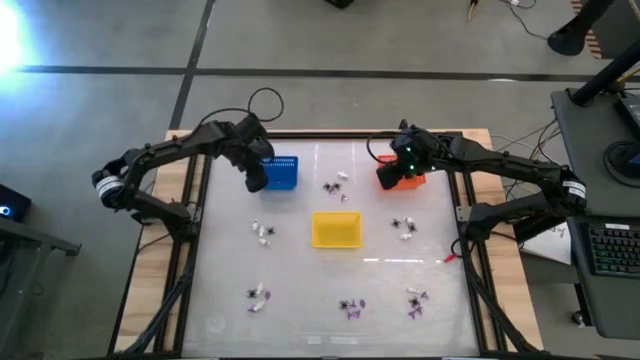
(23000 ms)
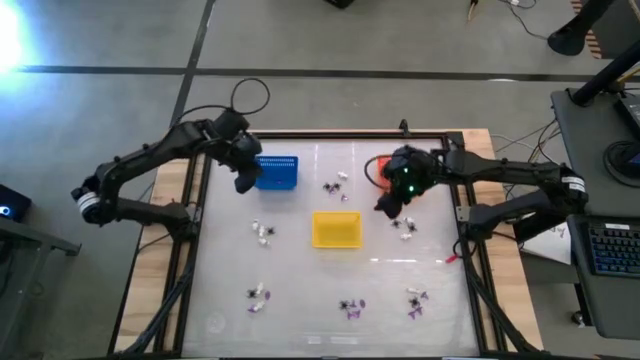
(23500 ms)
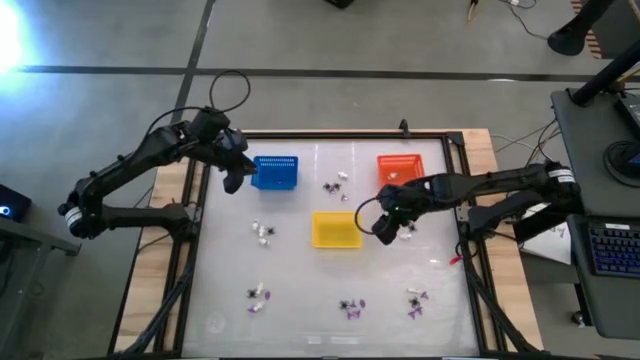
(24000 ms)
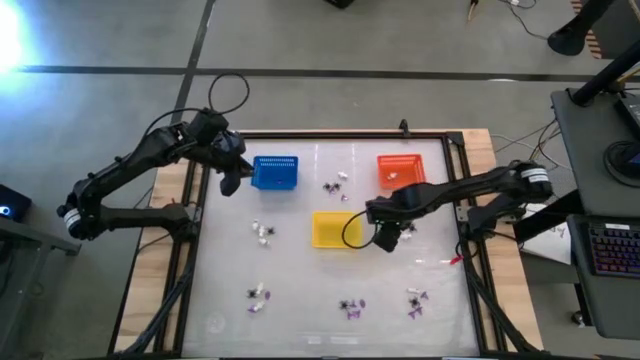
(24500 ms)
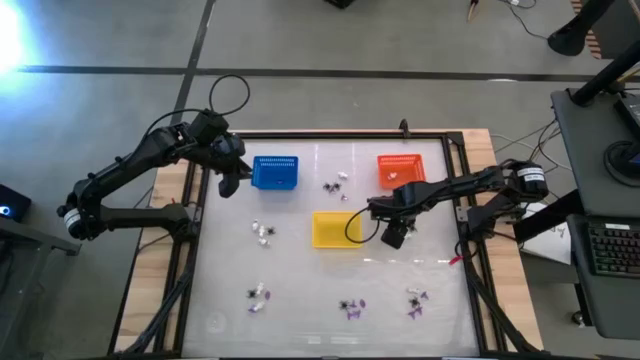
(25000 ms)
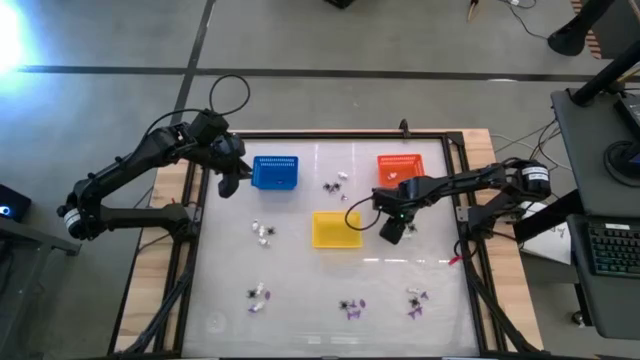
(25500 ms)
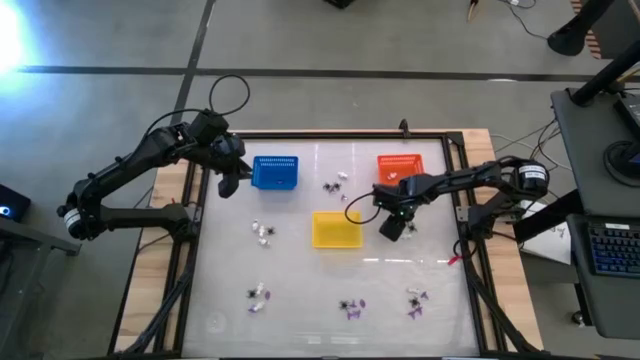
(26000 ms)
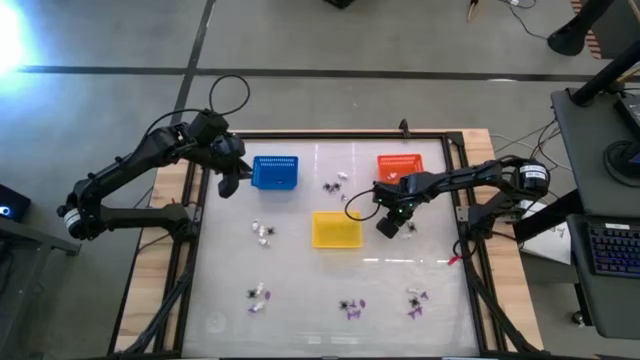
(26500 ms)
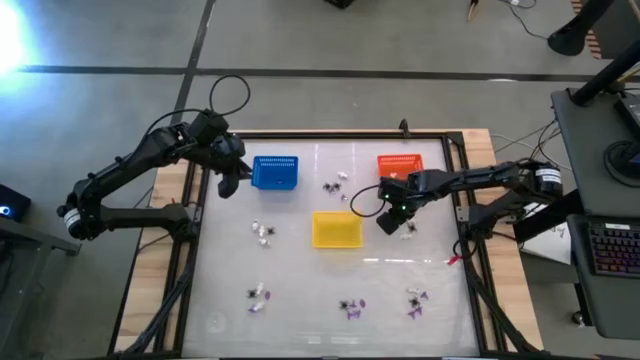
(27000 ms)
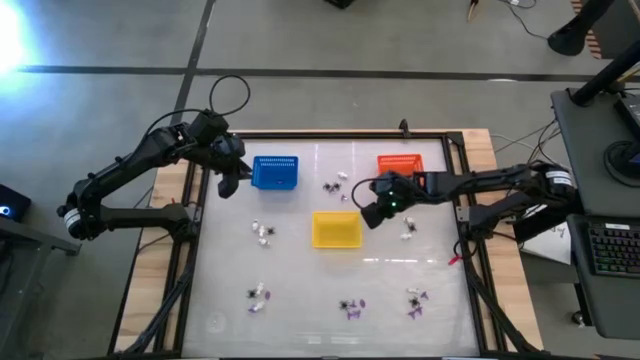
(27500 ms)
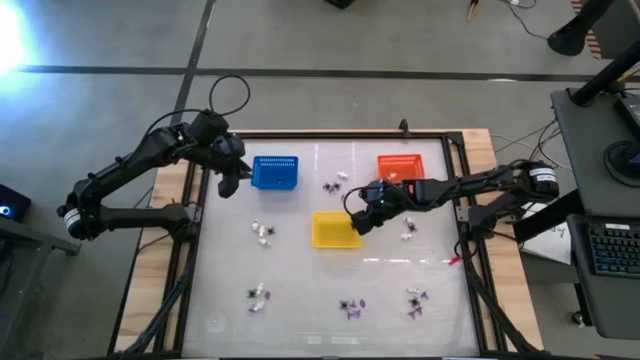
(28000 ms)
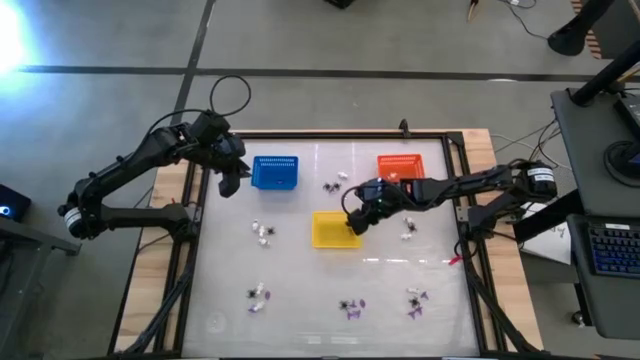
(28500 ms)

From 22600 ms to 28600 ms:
Task: Sort Halloween decoration
Put the black spider toy into the yellow bin

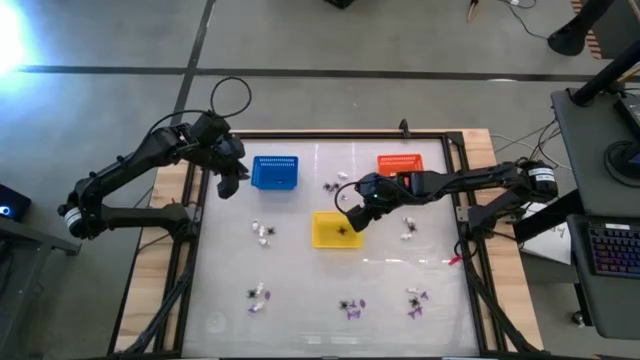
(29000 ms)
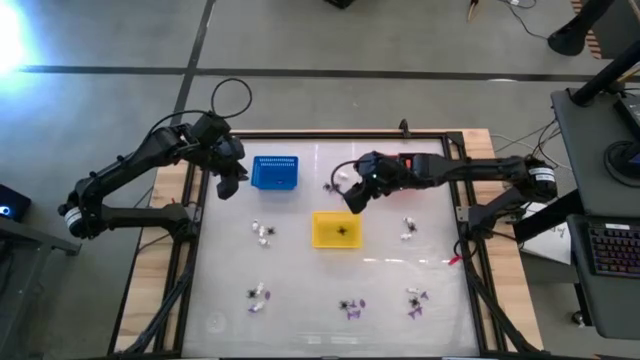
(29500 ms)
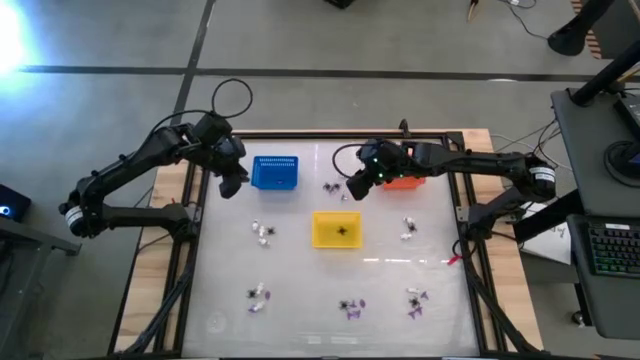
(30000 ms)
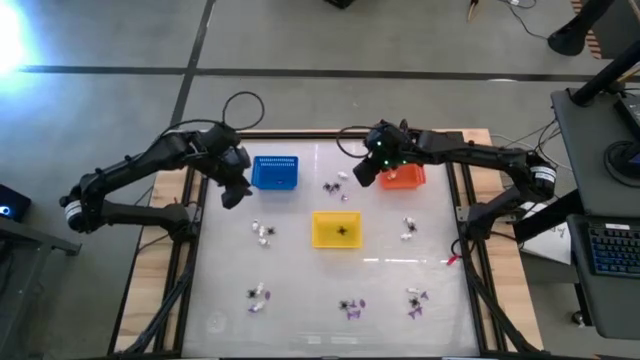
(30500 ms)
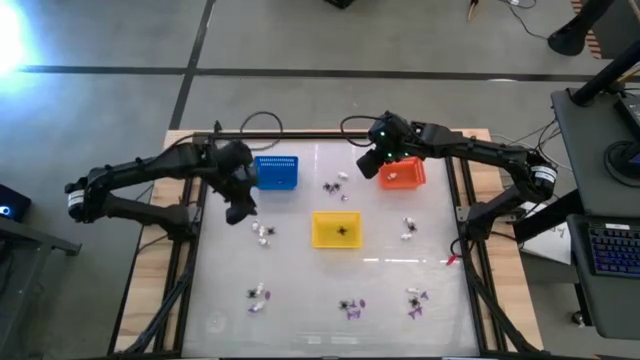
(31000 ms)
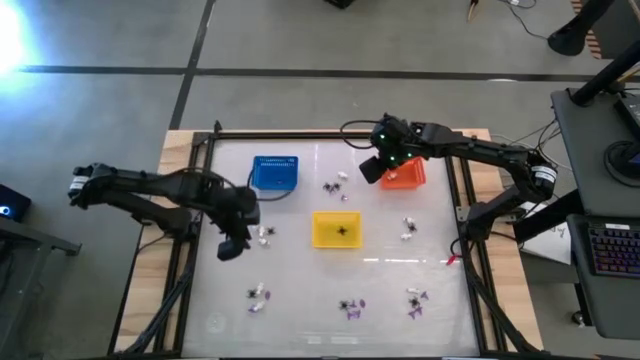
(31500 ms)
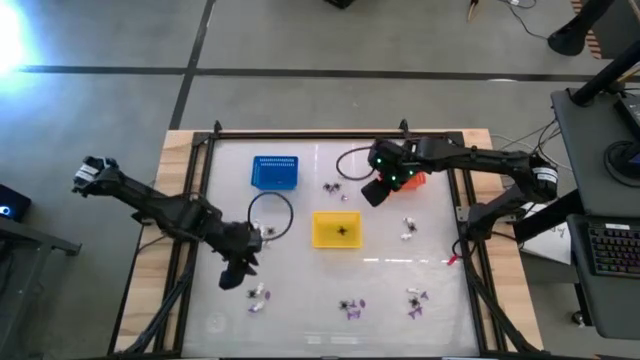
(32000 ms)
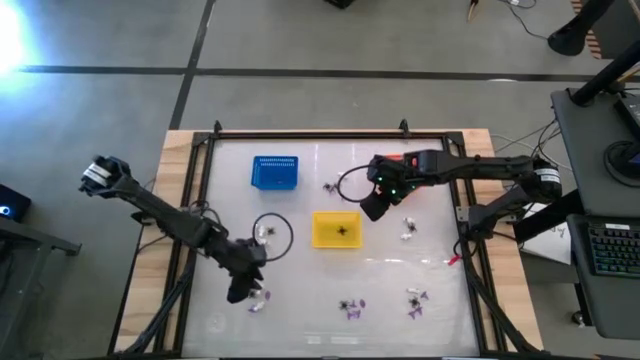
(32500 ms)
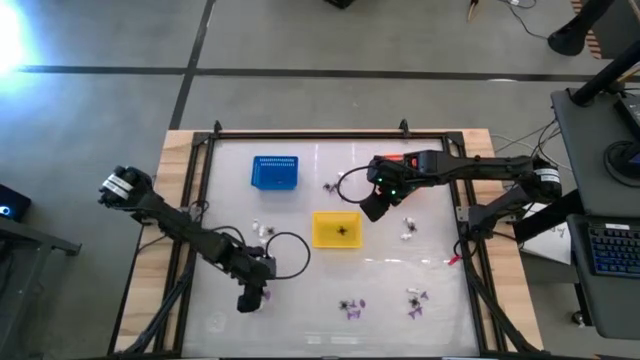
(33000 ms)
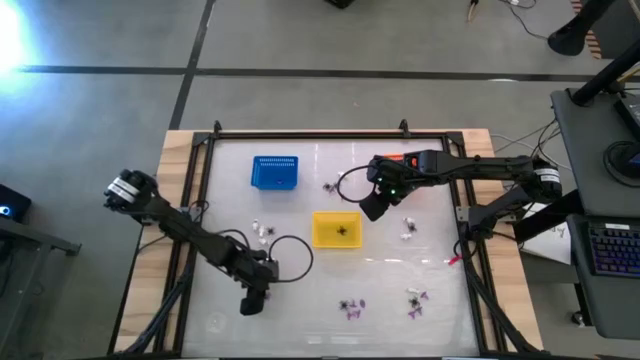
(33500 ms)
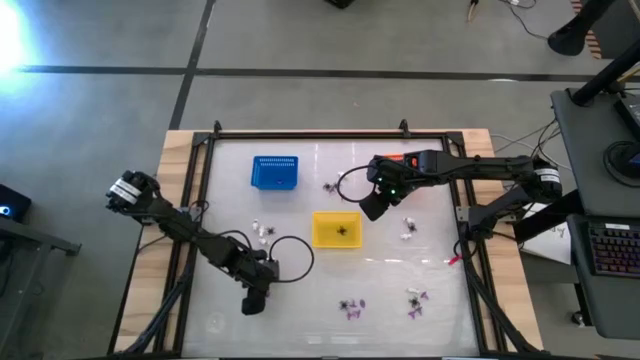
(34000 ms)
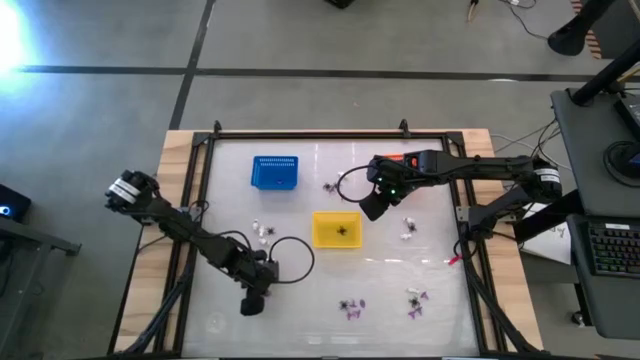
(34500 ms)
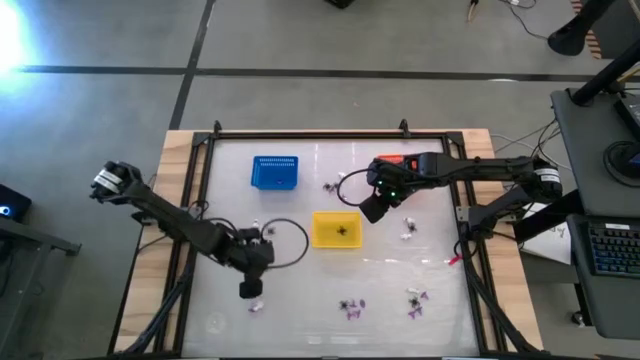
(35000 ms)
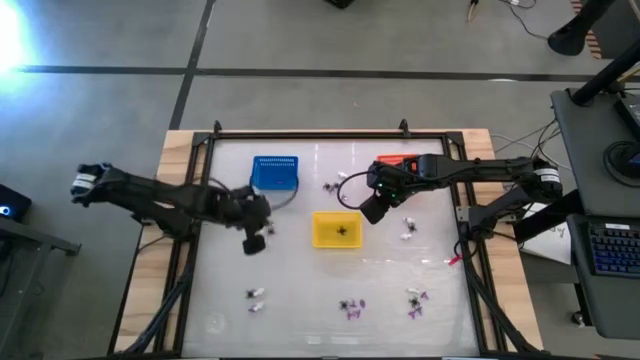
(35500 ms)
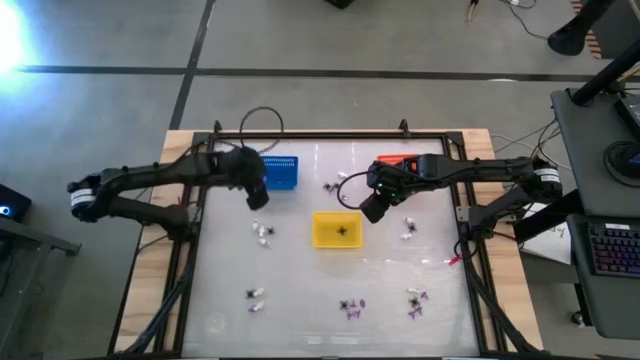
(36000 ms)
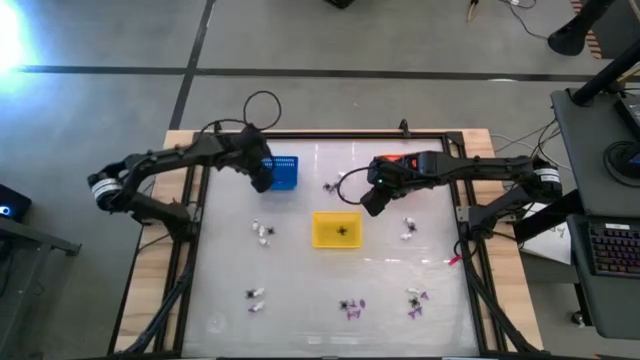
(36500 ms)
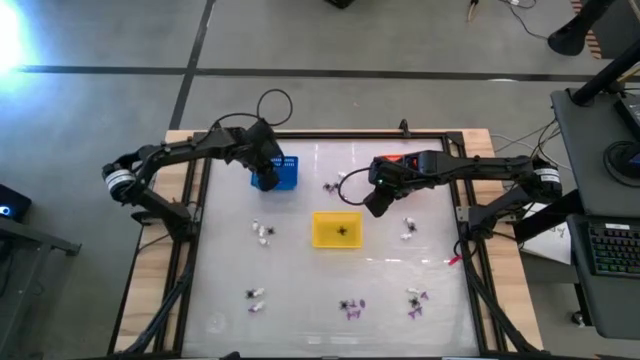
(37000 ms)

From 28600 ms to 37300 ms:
Put the purple witch hat toy into the blue bin

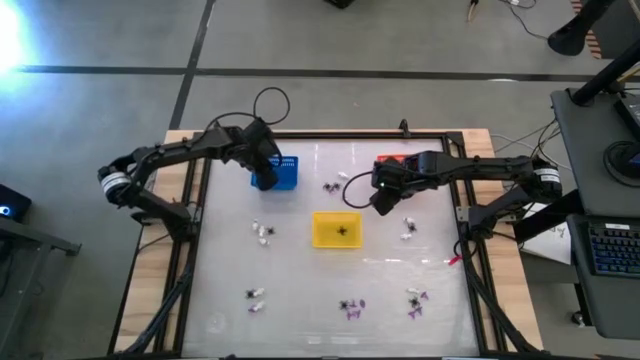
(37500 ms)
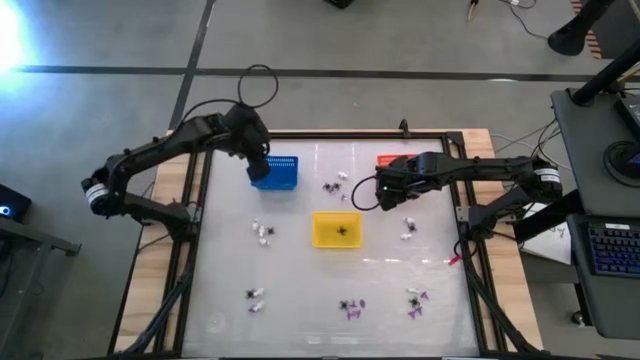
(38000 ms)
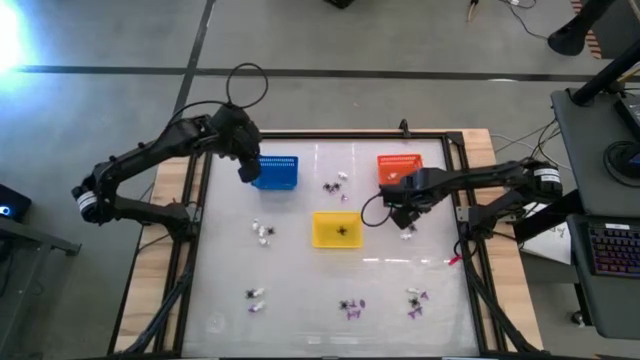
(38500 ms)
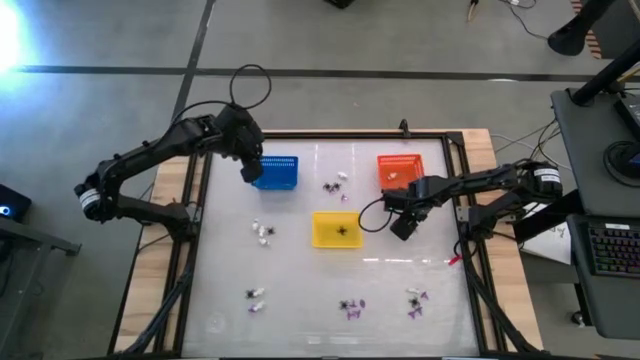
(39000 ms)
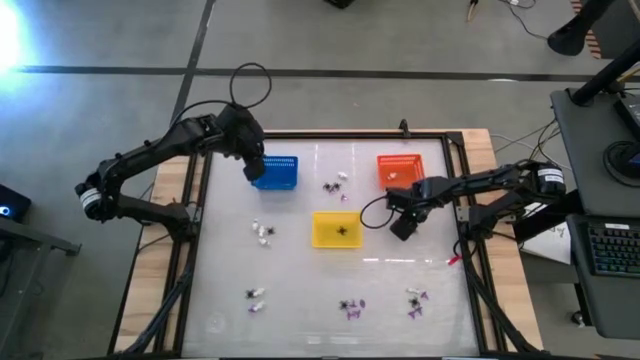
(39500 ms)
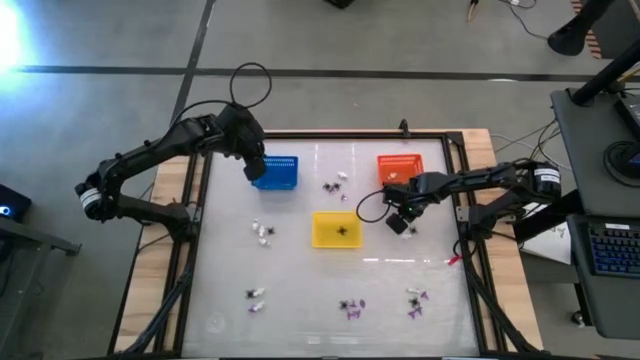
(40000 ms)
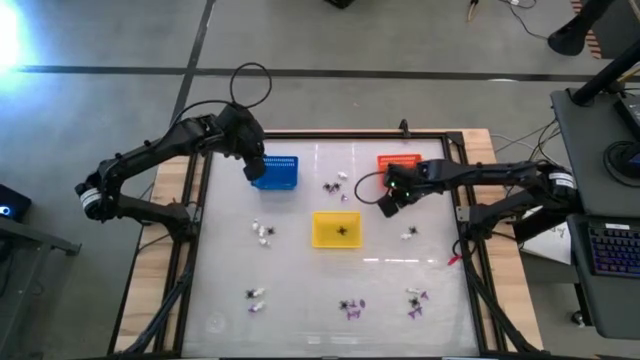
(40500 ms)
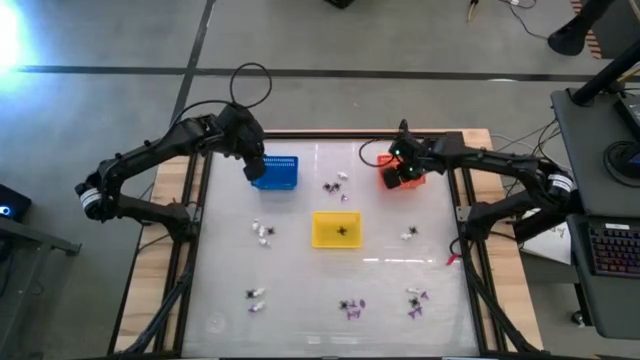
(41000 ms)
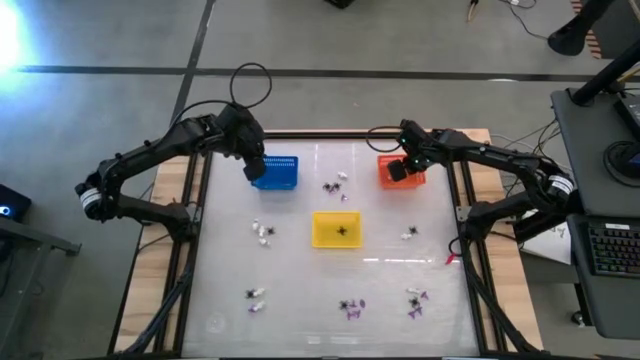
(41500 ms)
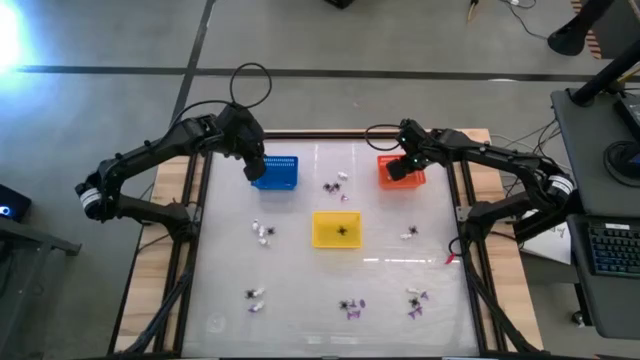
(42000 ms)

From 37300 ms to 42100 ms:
Put the white skeleton toy into the orange bin

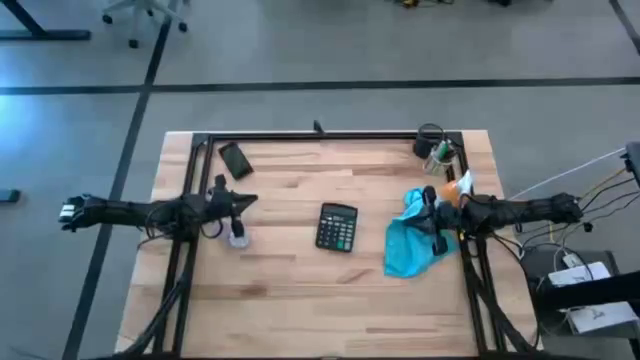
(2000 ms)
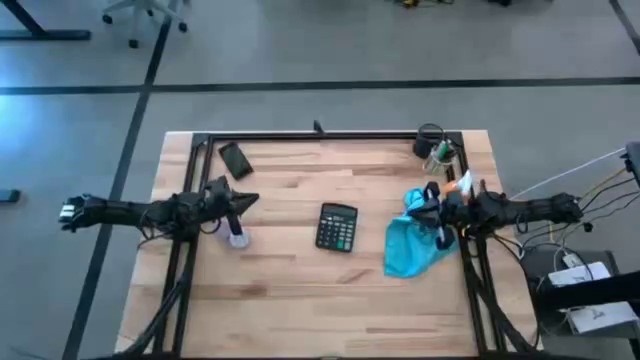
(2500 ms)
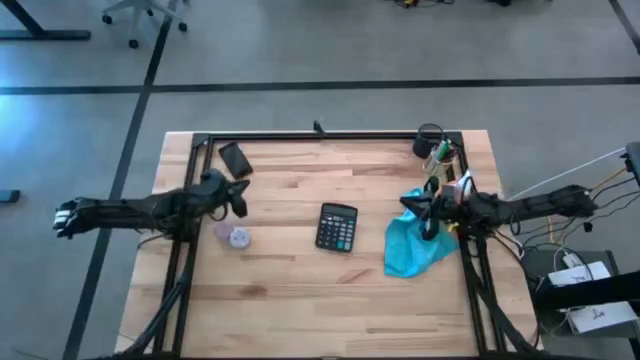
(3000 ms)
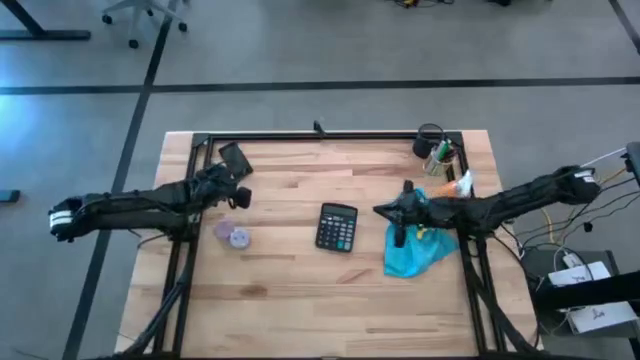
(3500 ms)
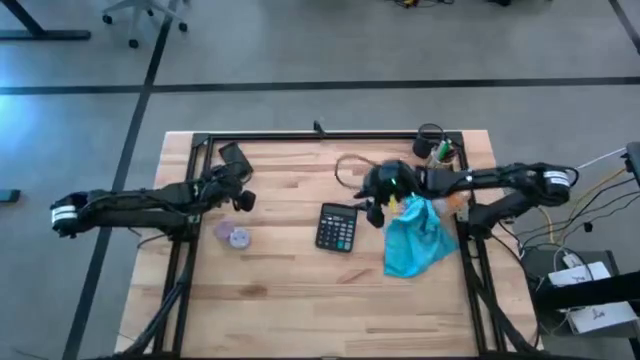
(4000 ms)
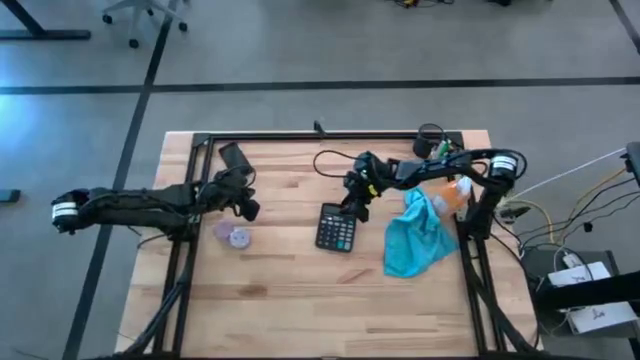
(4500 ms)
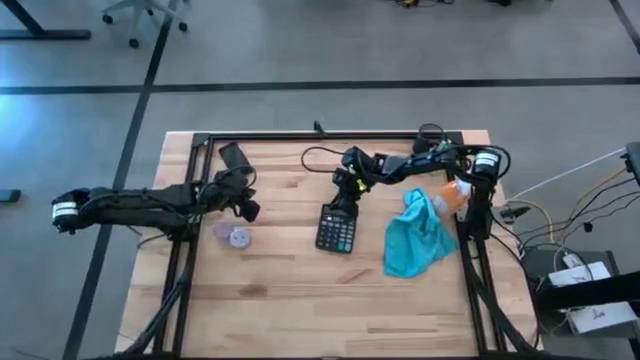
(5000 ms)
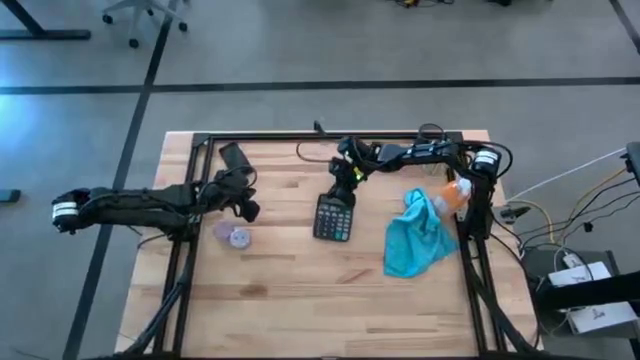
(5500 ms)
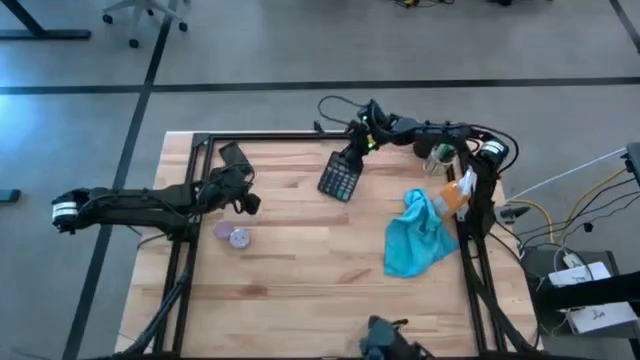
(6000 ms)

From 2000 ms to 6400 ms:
Task: Apply microfiber cloth
Move the black calculator to the top center of the table
